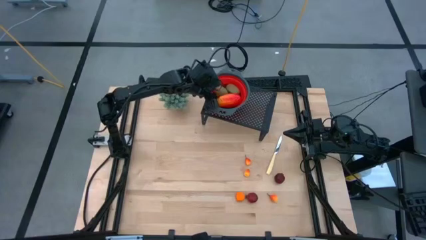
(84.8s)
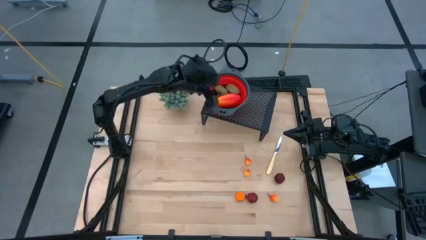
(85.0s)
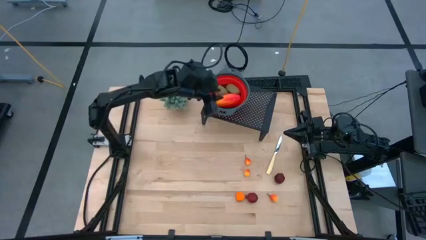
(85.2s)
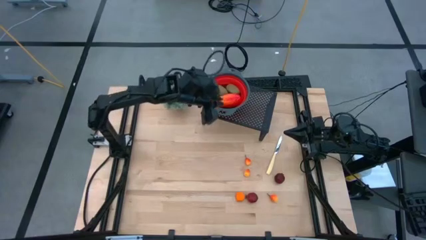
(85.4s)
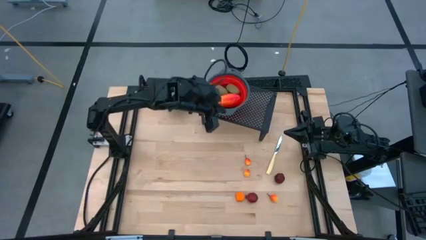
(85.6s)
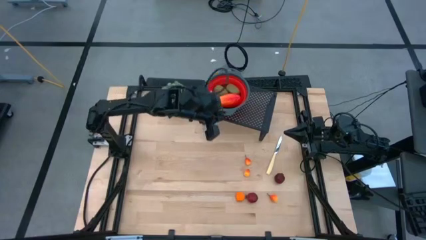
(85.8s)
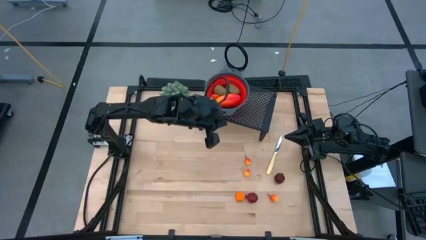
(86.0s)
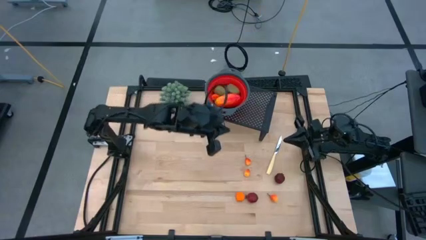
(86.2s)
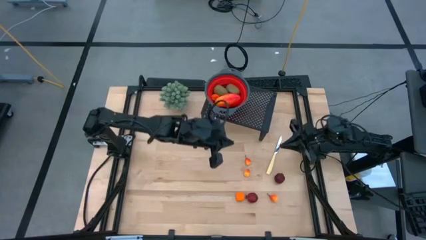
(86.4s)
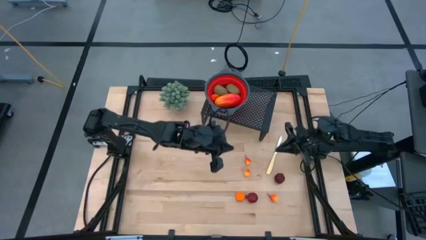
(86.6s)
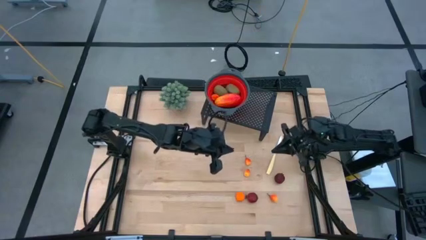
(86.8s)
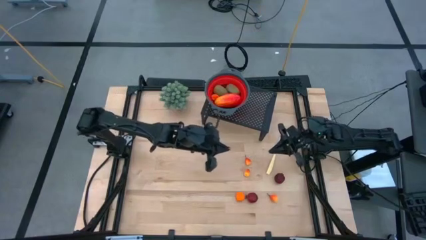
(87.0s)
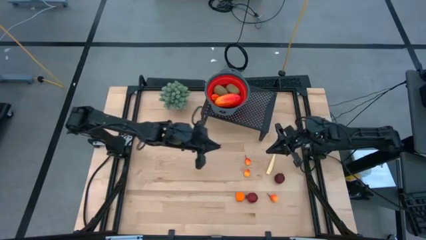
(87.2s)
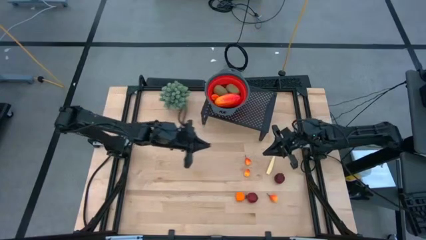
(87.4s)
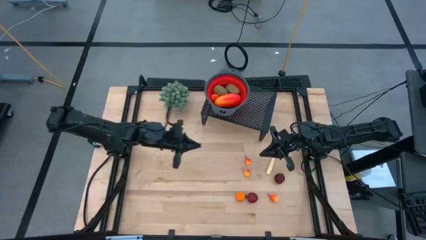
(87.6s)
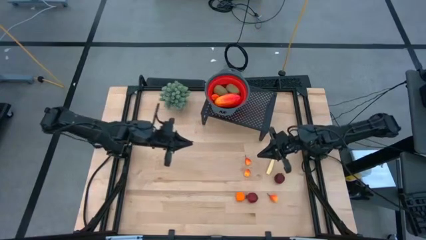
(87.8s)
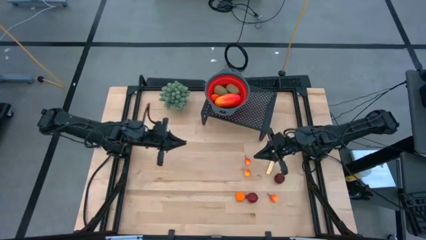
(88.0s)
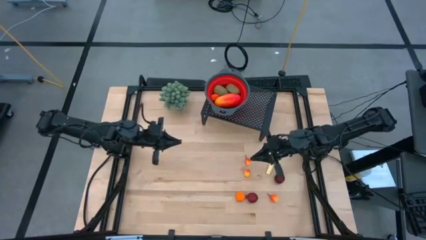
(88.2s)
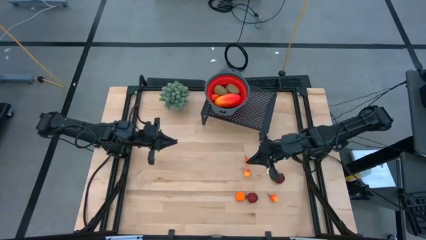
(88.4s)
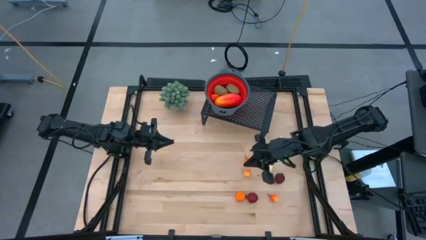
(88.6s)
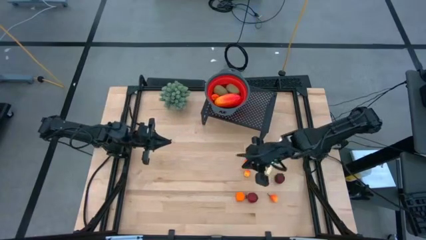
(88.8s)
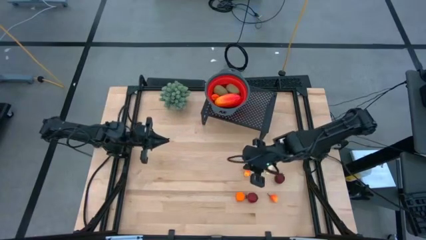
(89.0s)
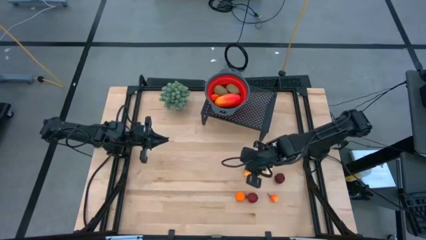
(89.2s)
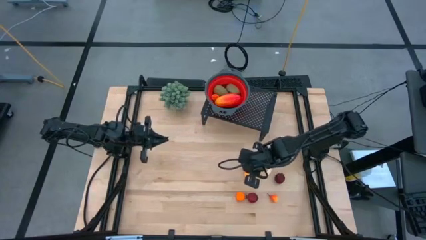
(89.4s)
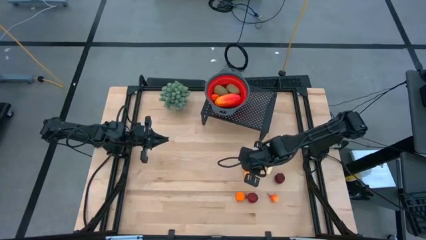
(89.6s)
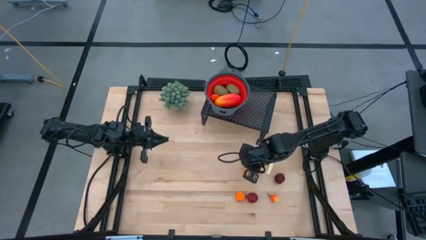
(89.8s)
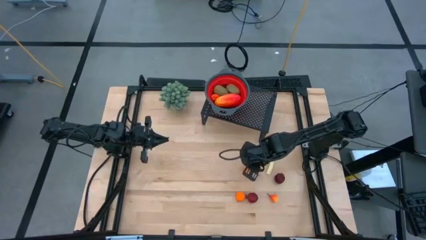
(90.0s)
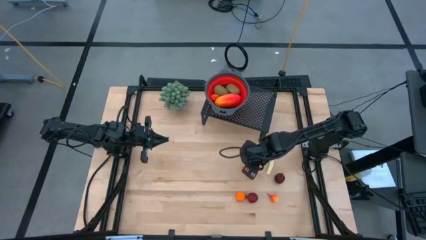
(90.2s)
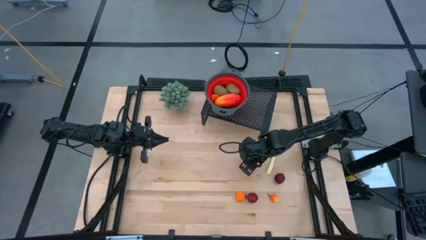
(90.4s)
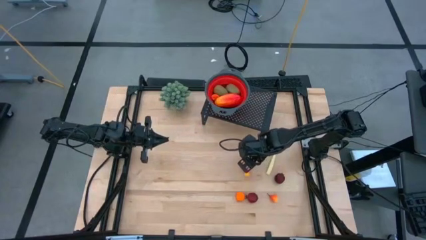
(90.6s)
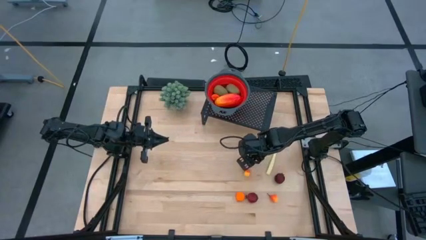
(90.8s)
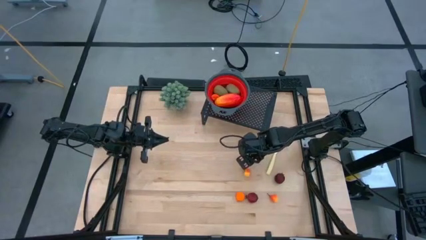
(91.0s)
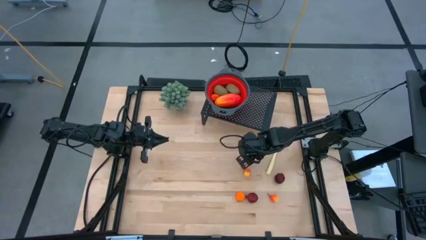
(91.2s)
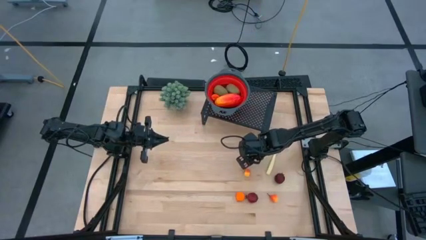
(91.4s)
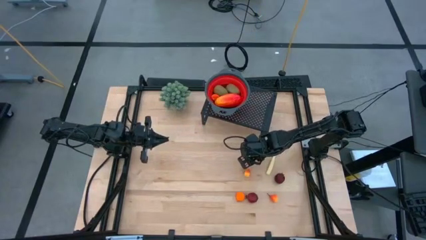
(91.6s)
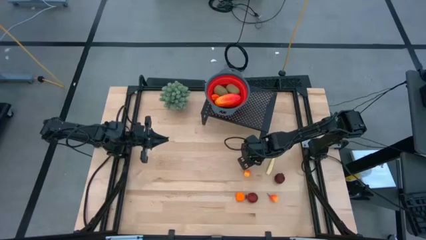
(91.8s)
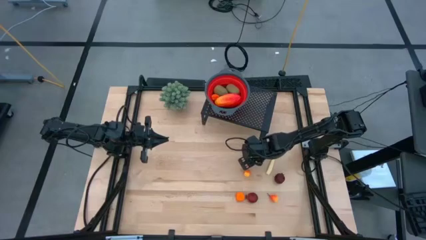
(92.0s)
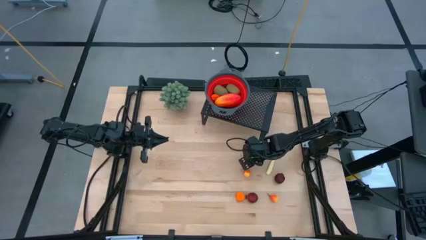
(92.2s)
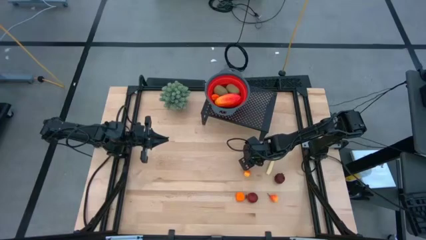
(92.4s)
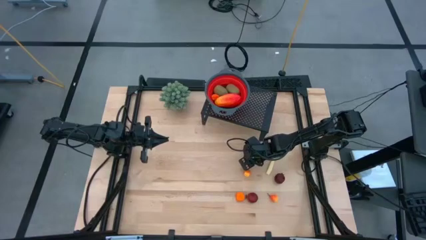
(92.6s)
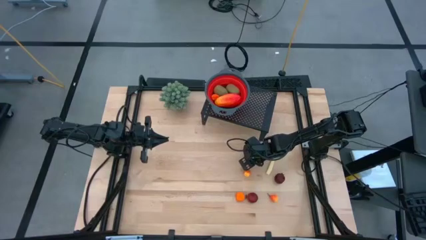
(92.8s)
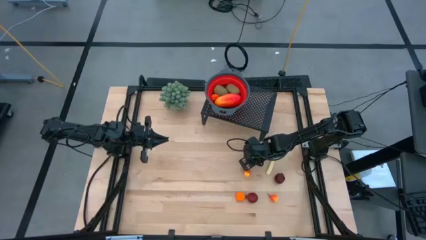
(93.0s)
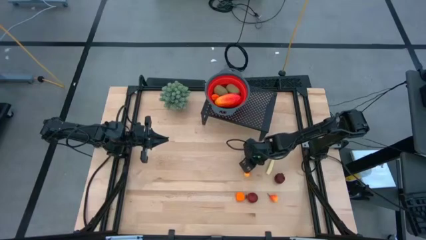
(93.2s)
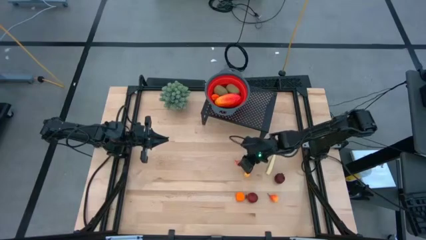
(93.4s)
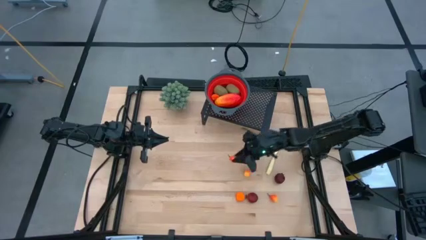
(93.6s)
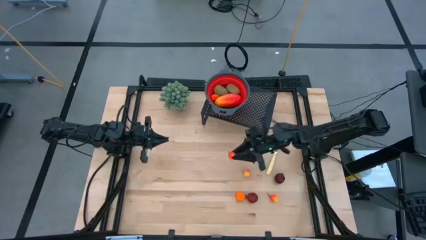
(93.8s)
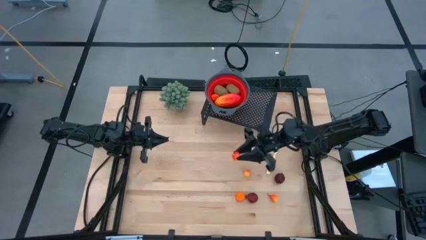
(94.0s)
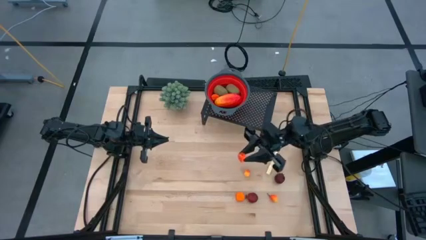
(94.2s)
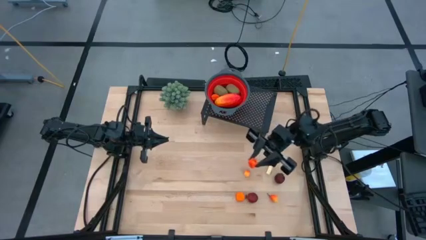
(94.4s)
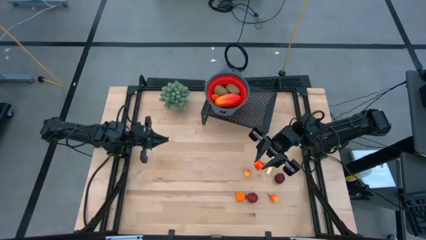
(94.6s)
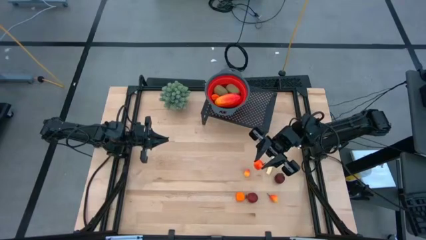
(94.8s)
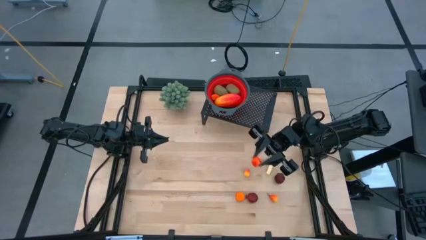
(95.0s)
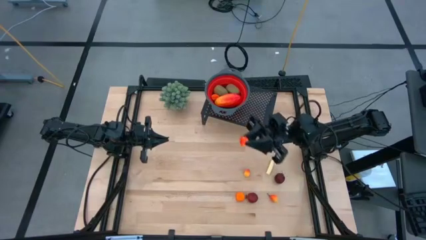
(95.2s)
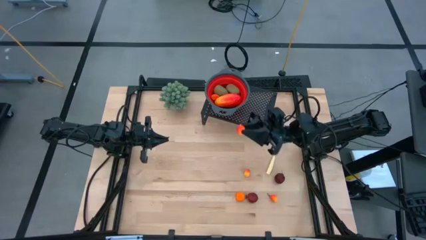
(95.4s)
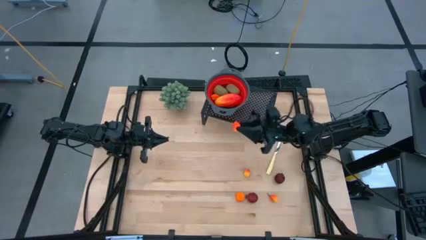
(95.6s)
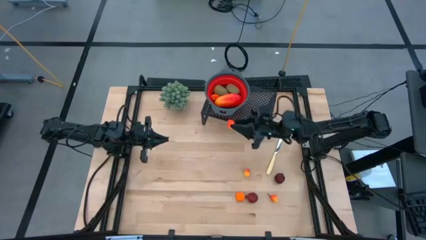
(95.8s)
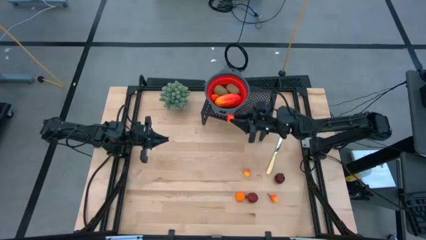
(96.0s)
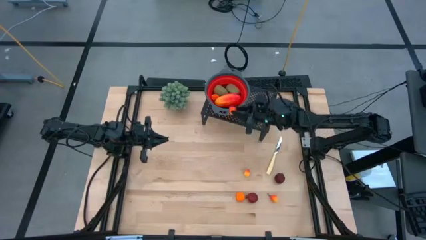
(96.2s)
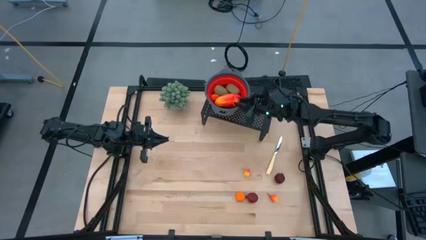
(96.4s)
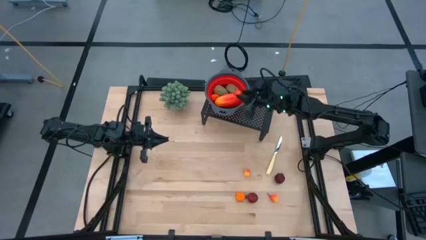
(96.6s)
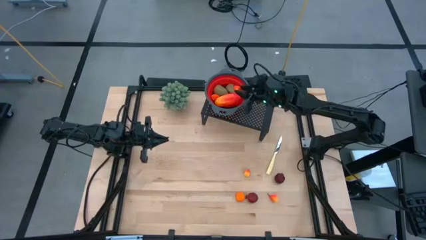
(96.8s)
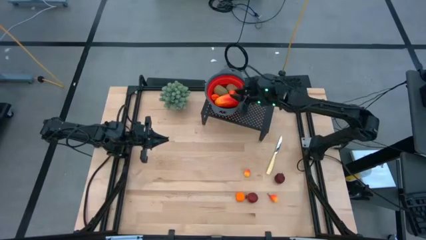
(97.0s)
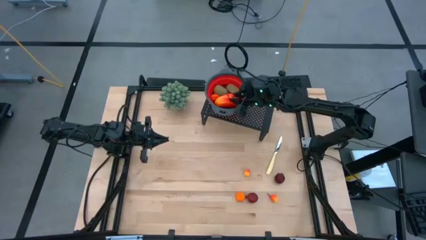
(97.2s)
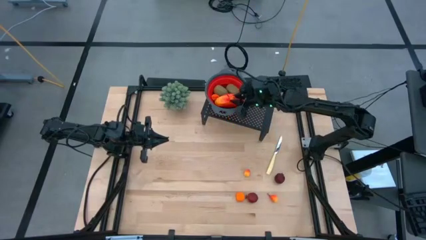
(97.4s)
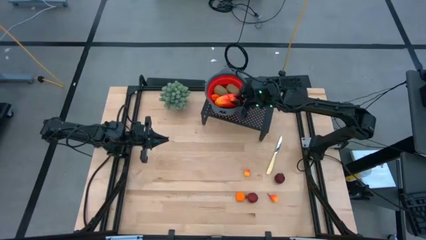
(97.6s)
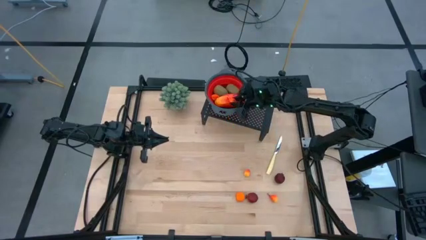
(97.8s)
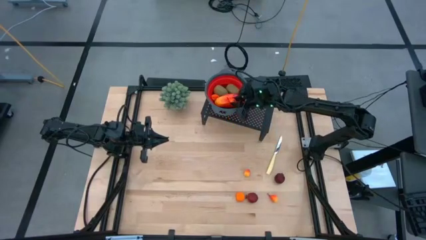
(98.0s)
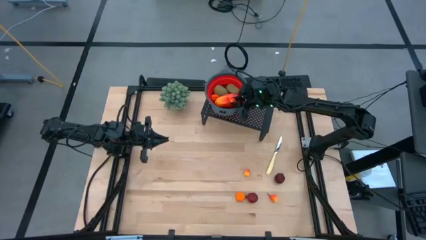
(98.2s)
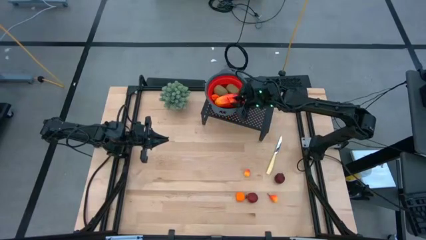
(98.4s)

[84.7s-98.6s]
Task: Pick & Place Fruit
Put the pear into the red strainer bowl
